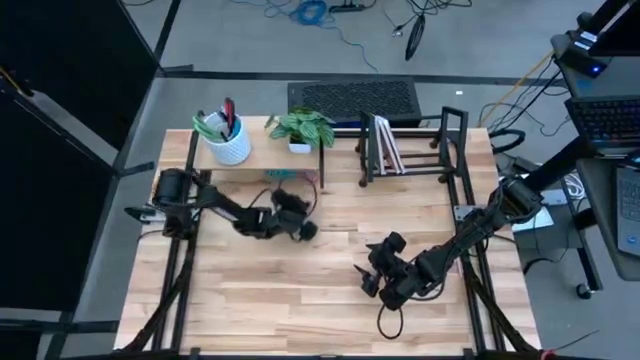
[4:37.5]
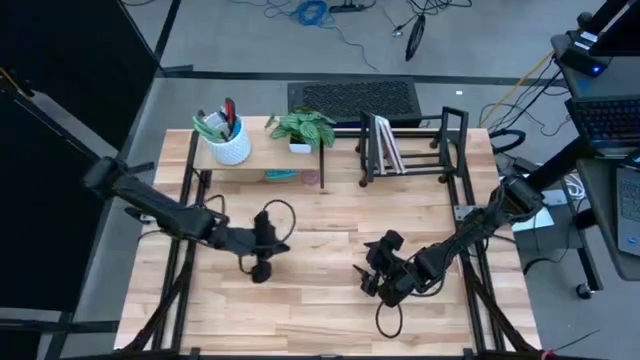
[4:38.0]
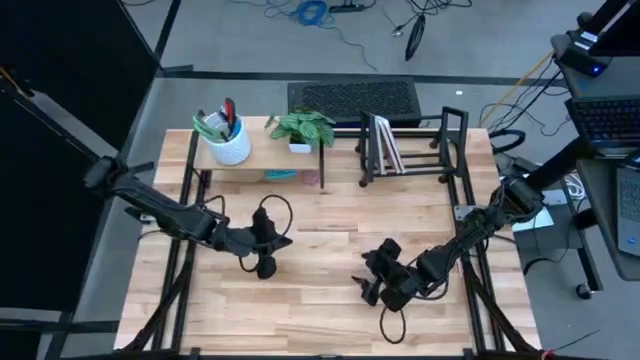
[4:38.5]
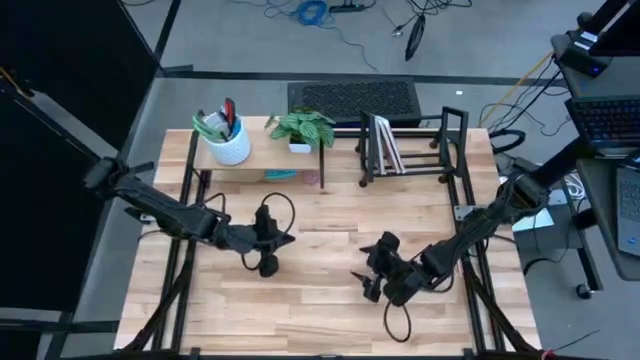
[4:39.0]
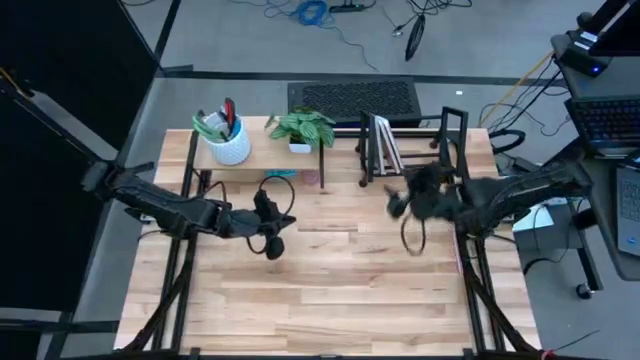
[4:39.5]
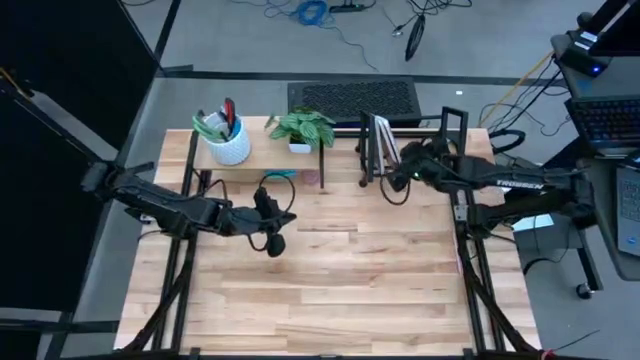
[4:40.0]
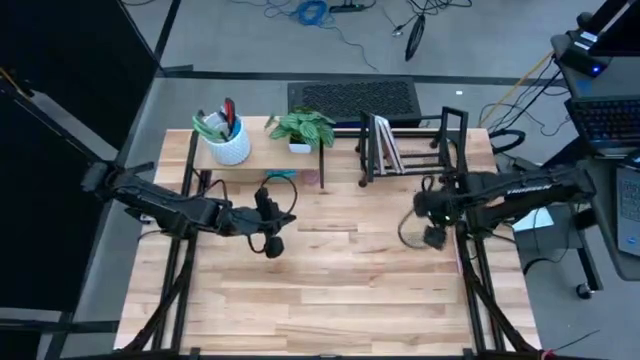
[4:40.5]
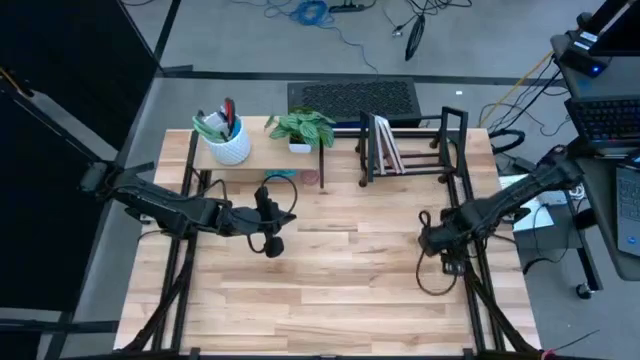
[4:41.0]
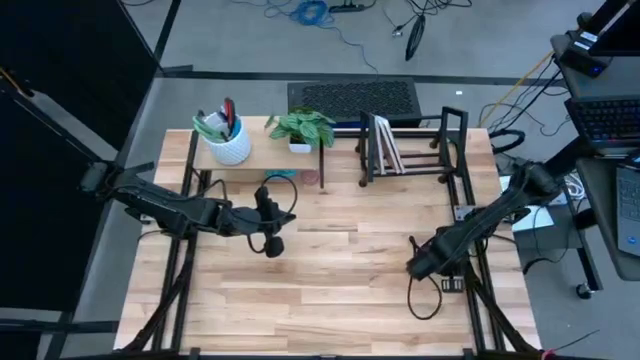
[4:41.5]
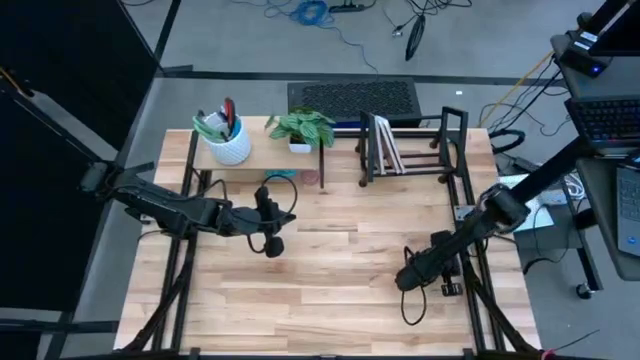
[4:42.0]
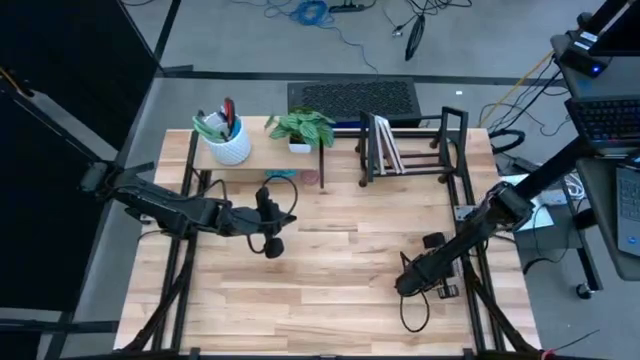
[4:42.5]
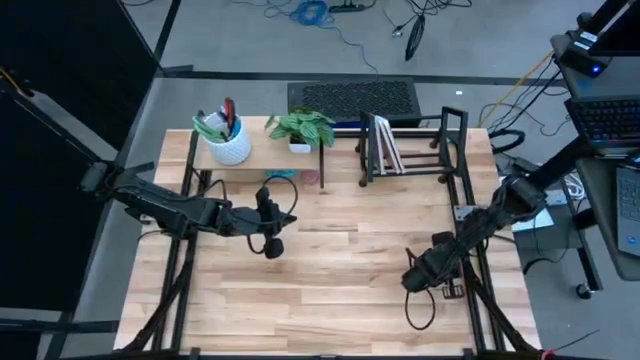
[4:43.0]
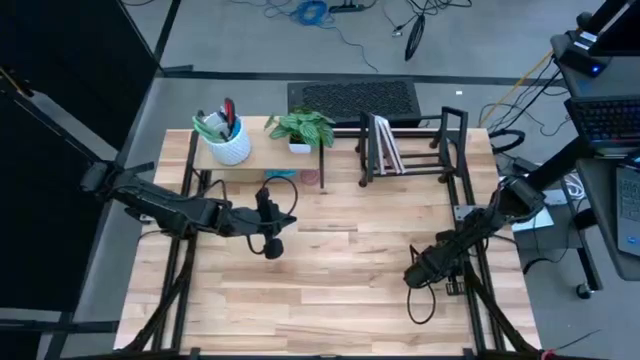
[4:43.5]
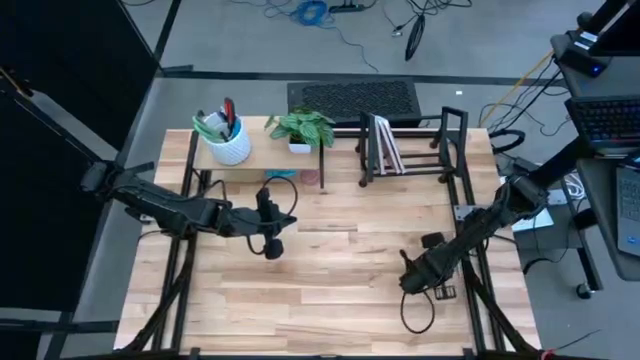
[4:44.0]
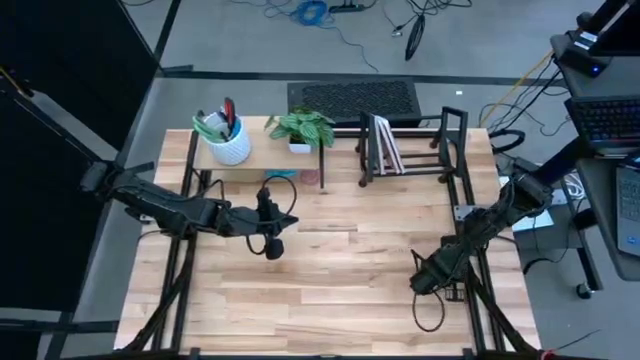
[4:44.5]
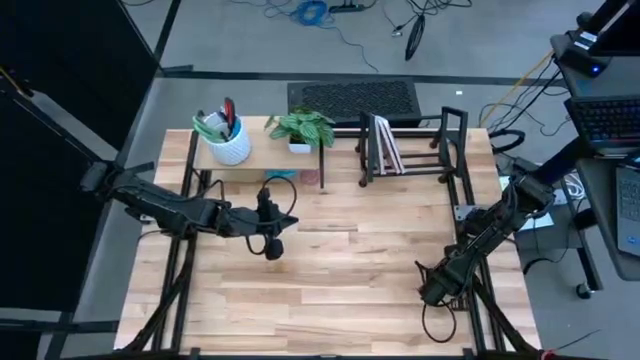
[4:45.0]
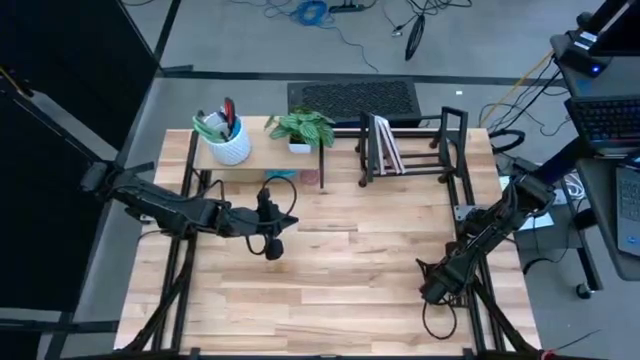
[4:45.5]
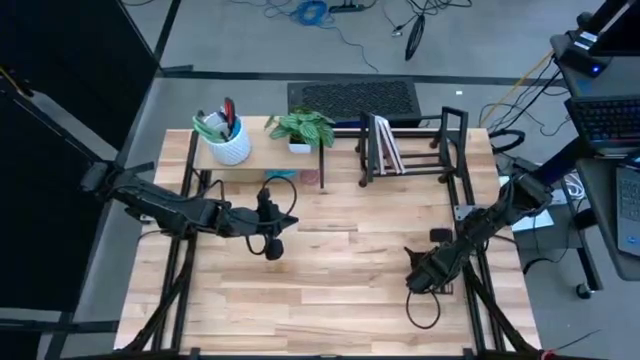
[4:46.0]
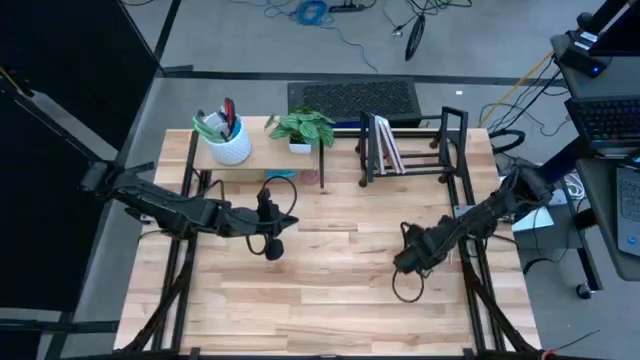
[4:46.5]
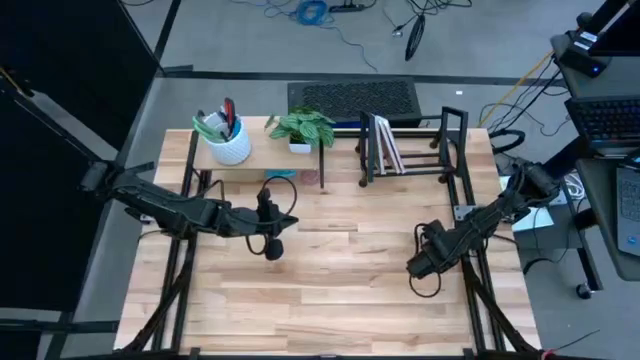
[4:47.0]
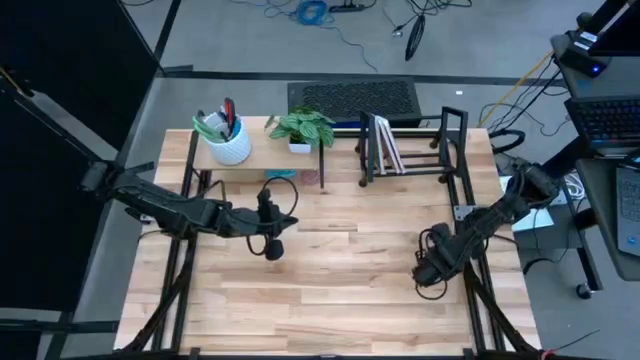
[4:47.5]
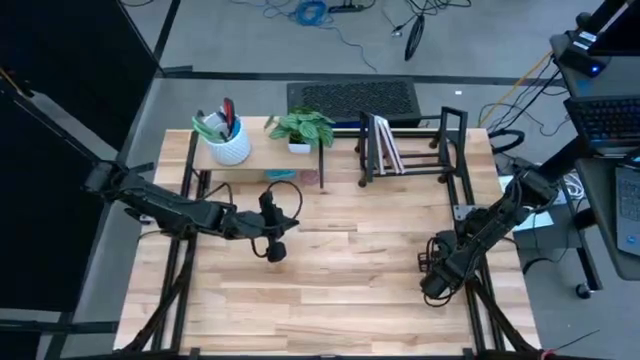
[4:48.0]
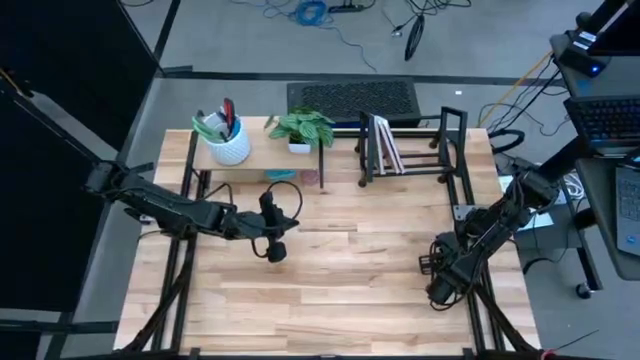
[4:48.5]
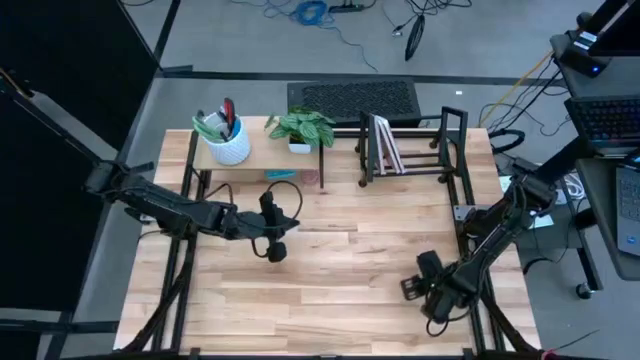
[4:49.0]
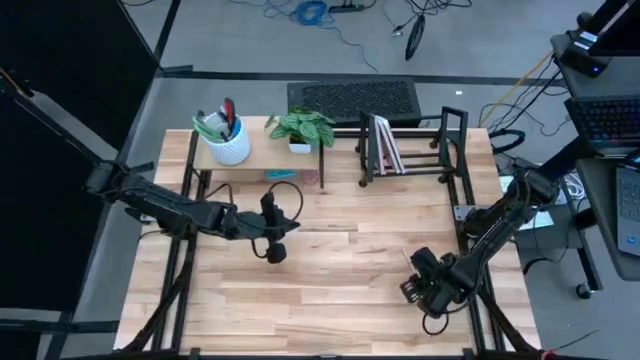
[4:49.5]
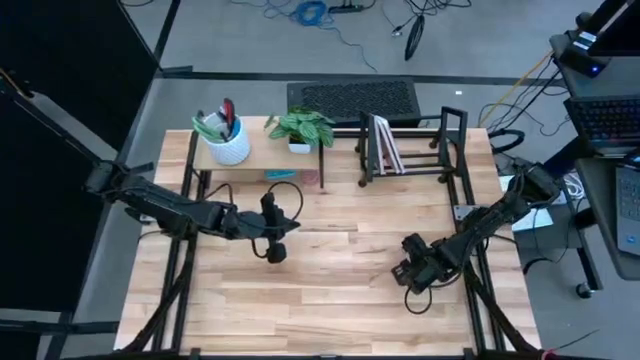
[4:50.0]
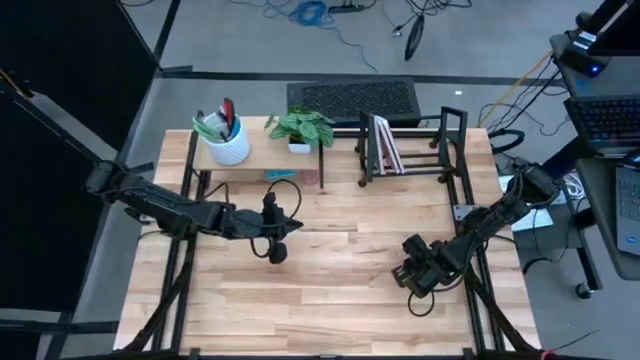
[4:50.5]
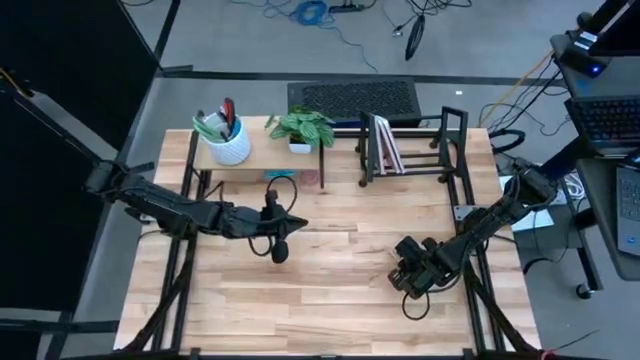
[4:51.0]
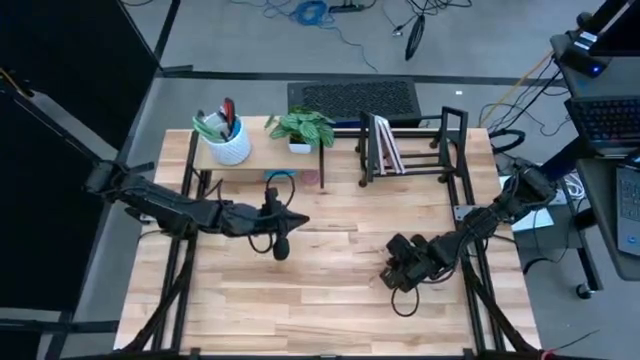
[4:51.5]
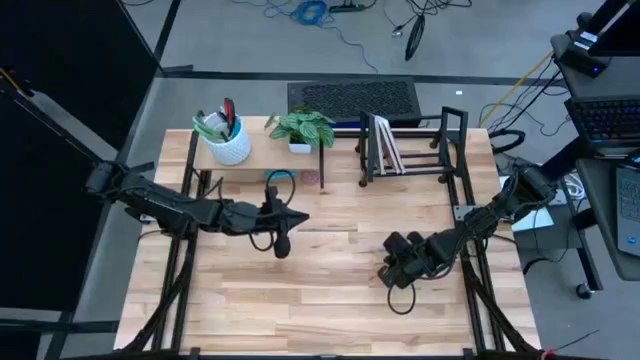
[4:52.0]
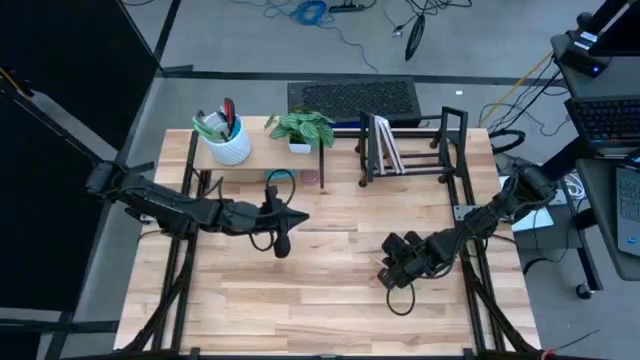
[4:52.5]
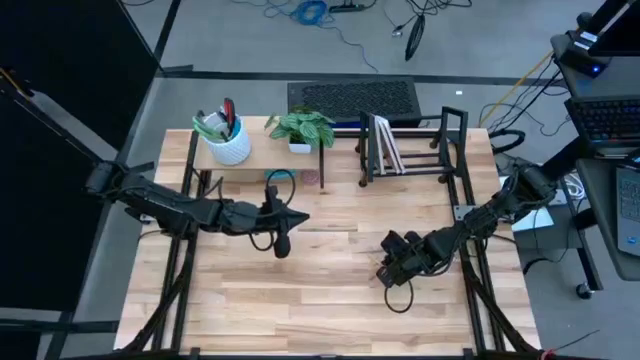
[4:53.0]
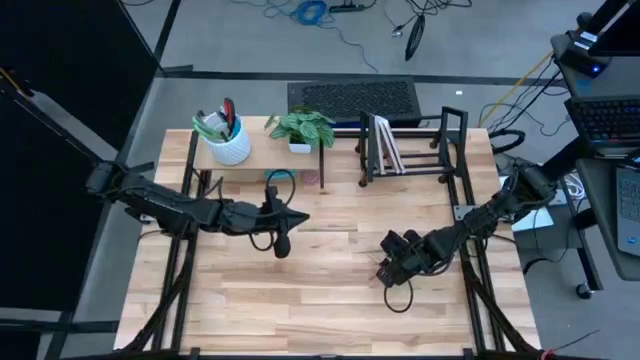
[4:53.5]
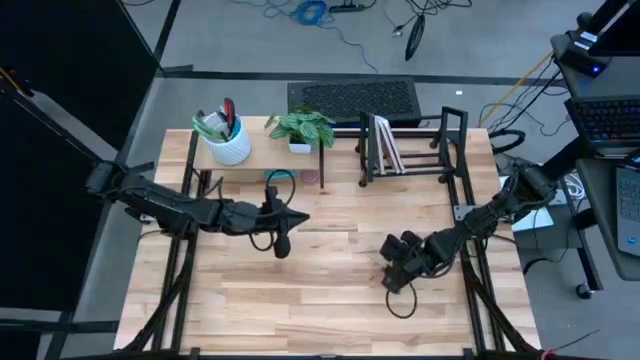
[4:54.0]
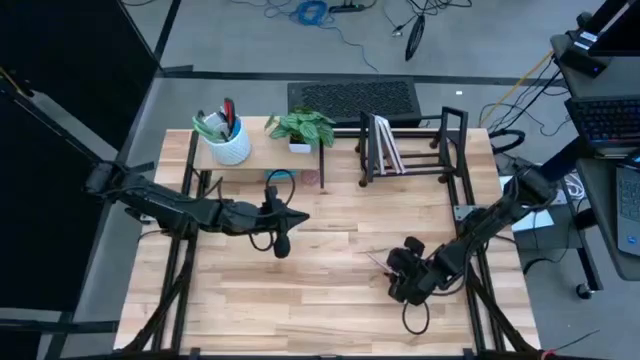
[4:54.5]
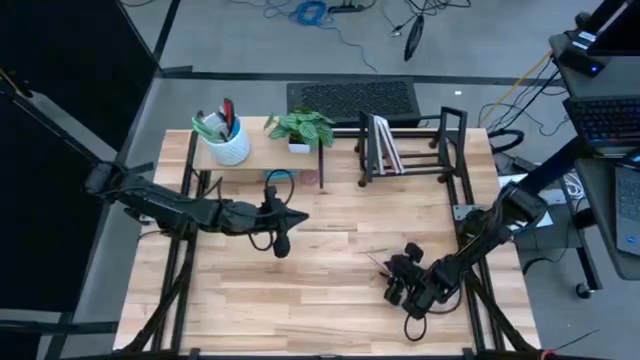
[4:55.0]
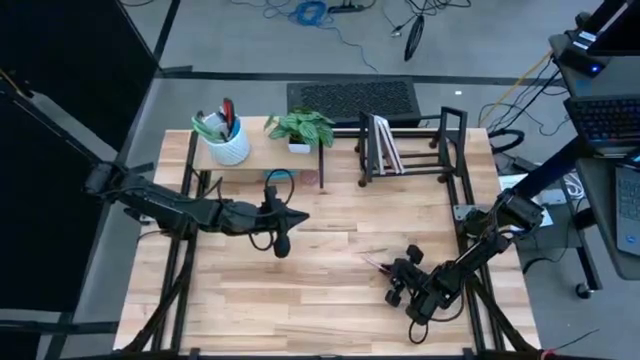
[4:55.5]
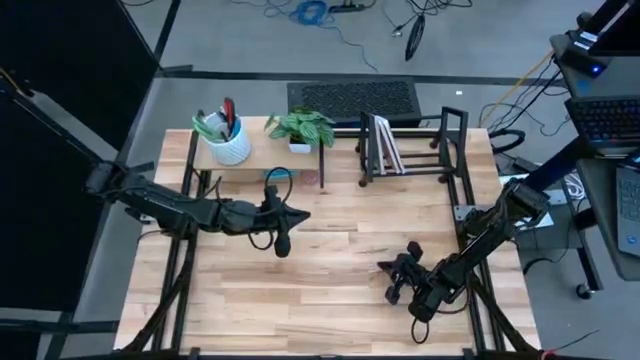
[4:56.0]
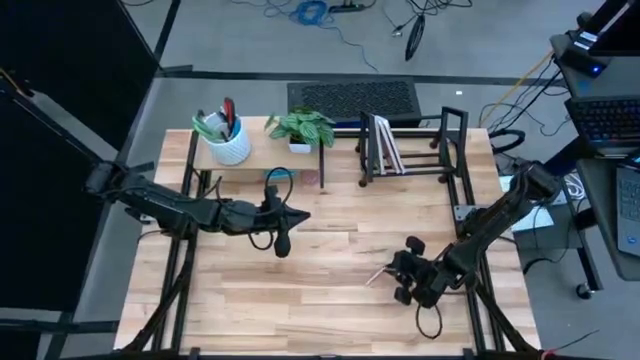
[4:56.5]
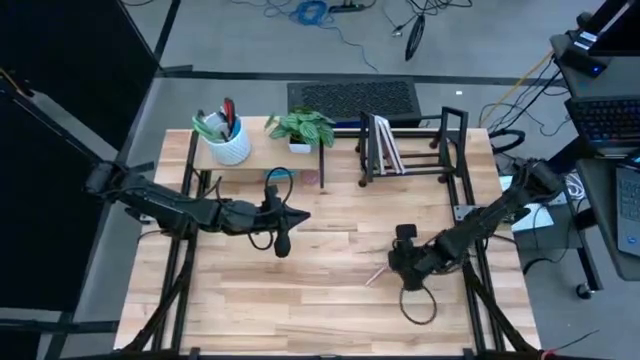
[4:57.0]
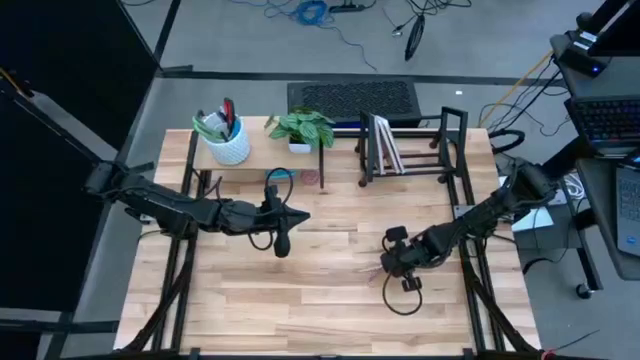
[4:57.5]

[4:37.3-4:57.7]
Task: Stock shelves
Put the pink pen into the white pen holder

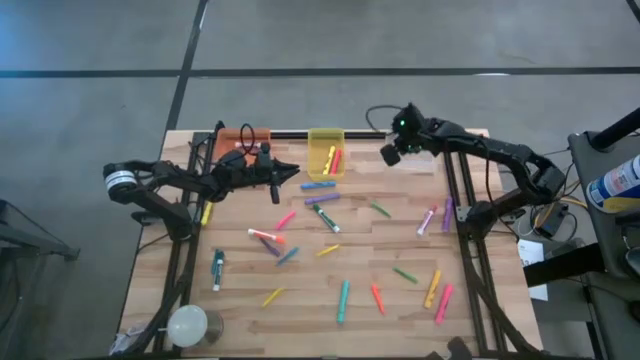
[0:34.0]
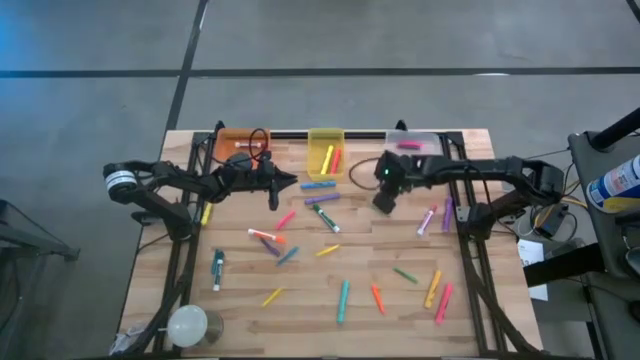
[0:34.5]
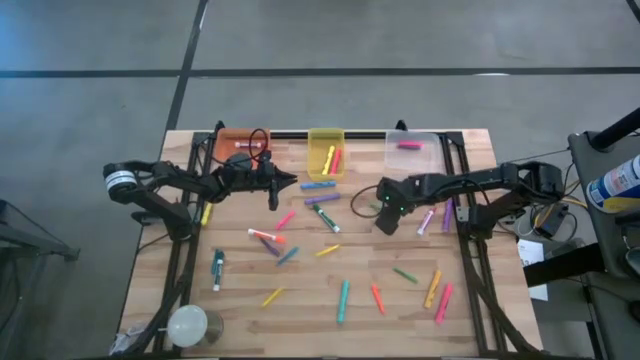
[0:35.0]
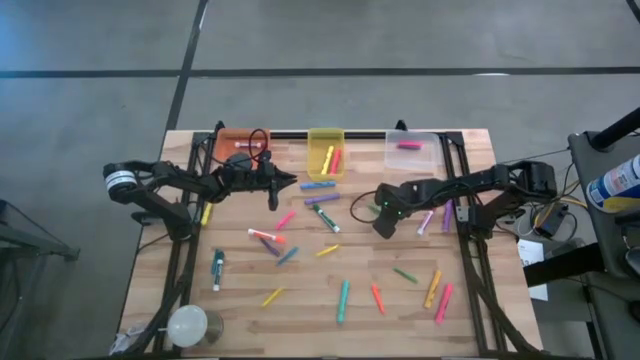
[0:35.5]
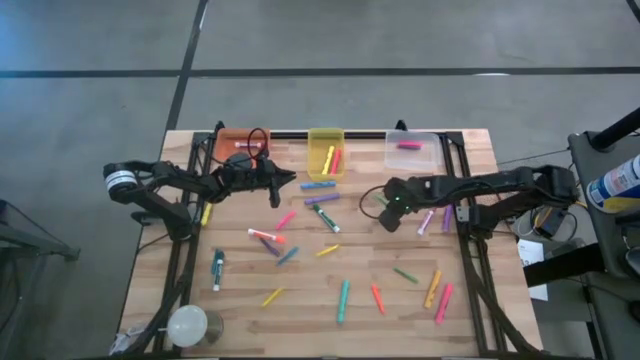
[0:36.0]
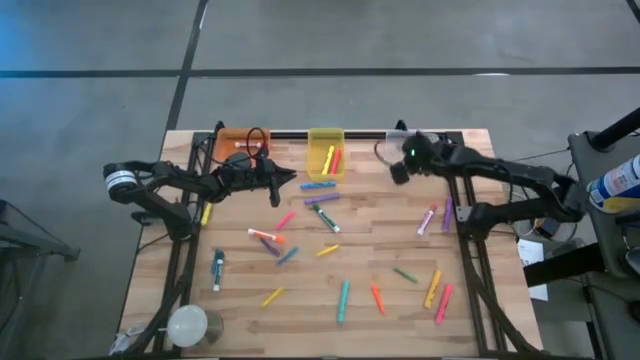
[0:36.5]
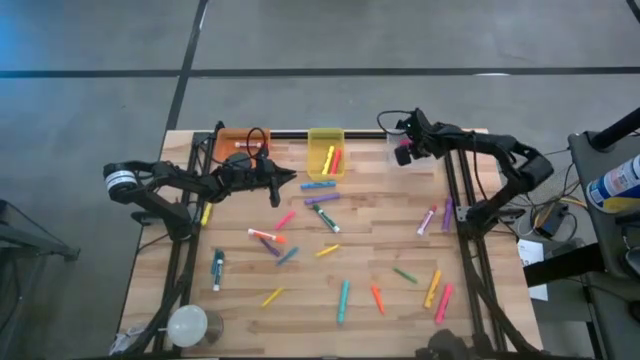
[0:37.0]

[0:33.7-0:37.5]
Task: Pick & Place Markers
Put the top green pen into the transparent bin
